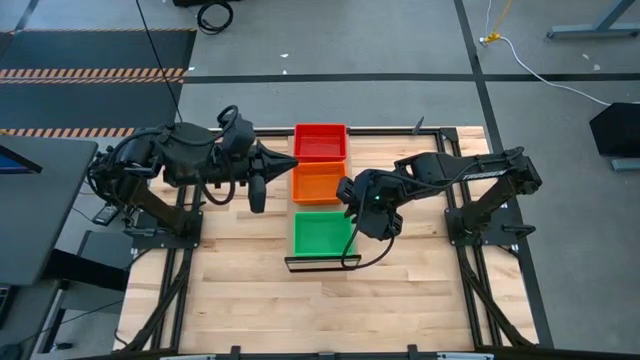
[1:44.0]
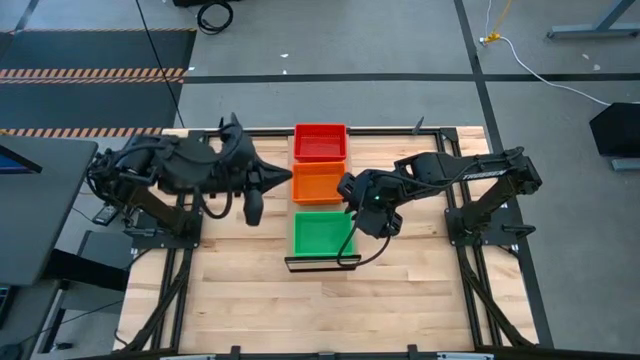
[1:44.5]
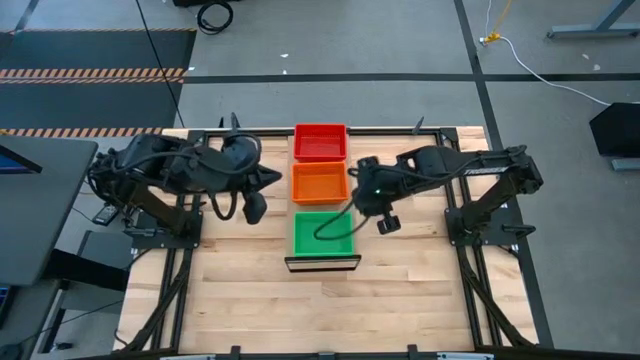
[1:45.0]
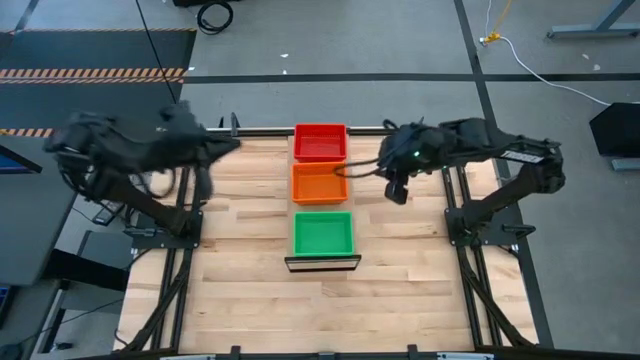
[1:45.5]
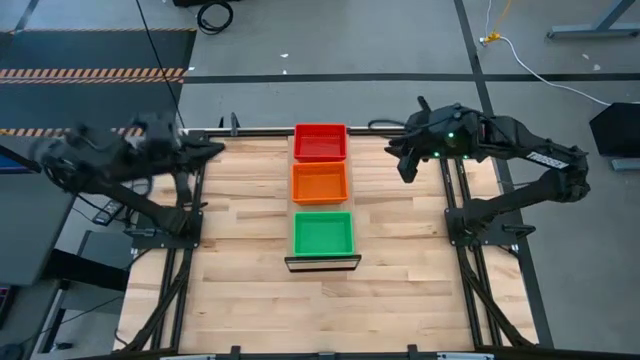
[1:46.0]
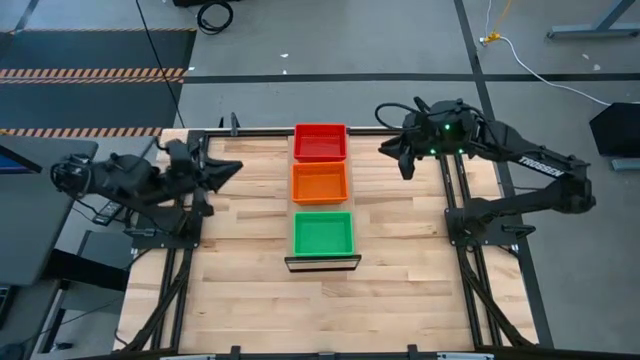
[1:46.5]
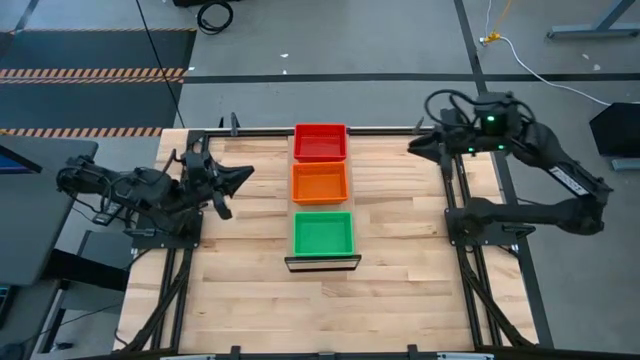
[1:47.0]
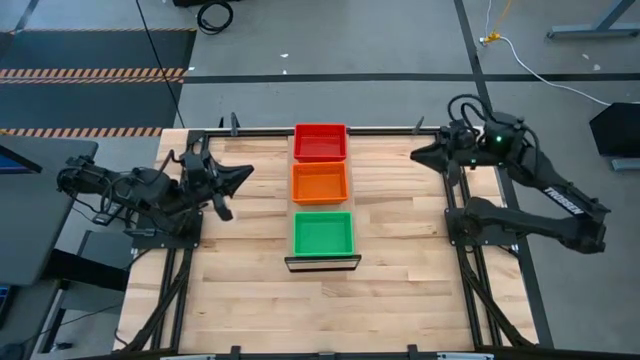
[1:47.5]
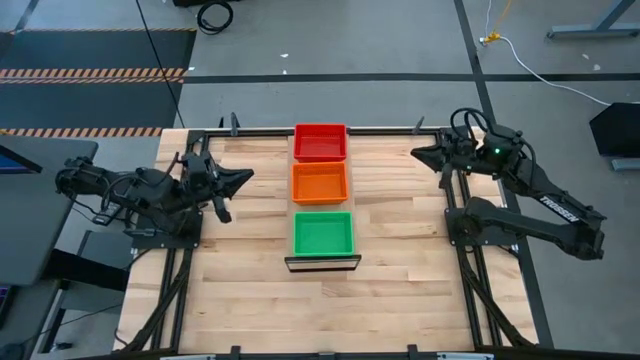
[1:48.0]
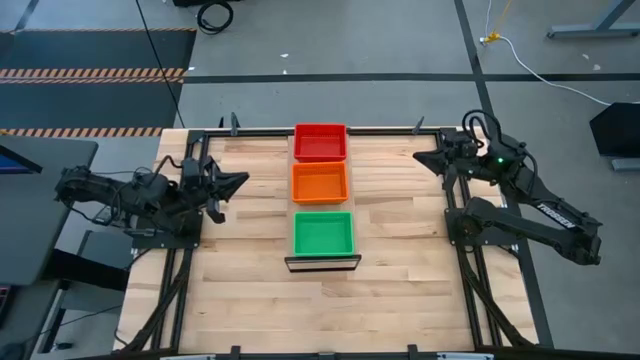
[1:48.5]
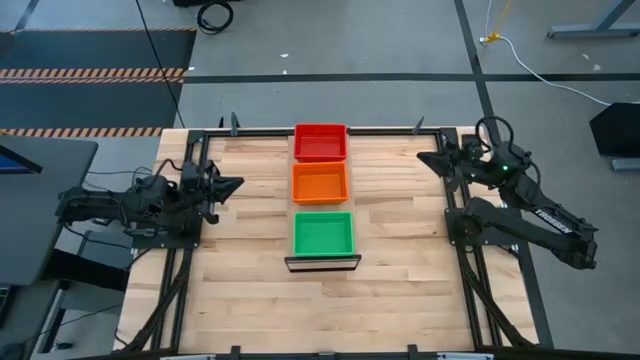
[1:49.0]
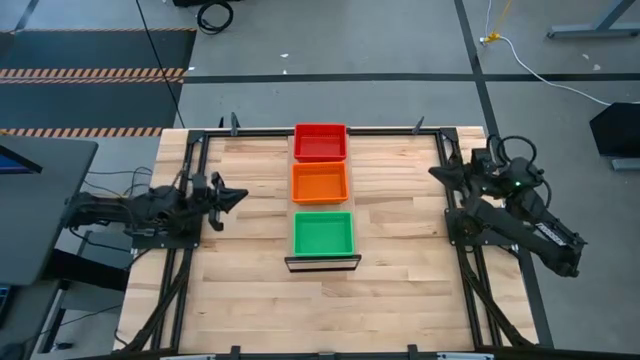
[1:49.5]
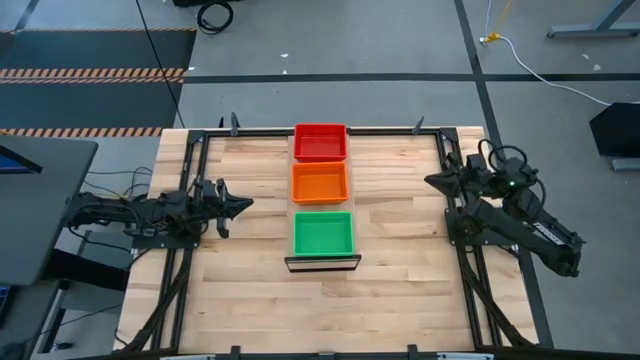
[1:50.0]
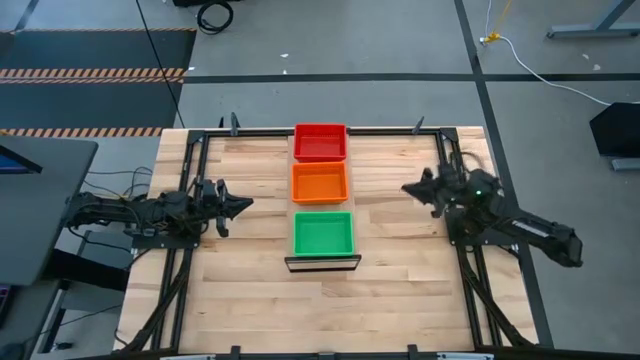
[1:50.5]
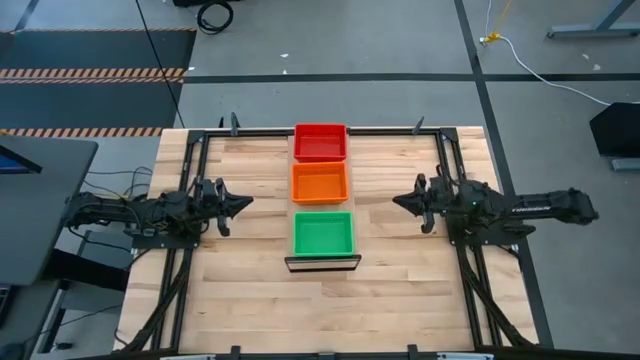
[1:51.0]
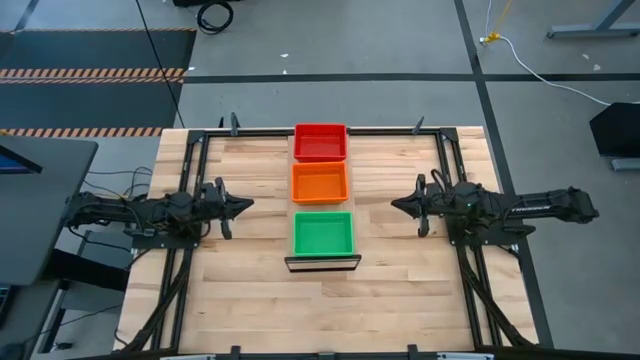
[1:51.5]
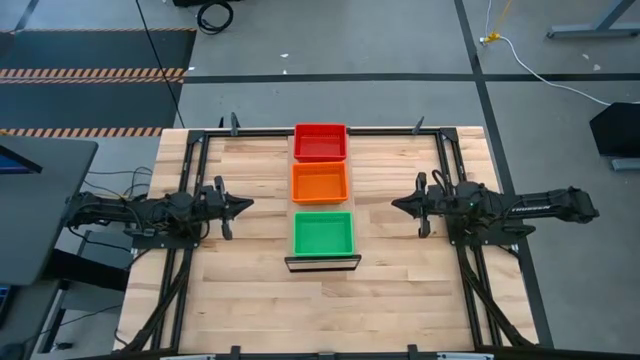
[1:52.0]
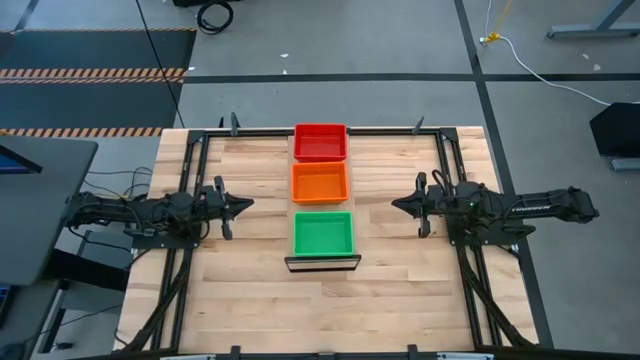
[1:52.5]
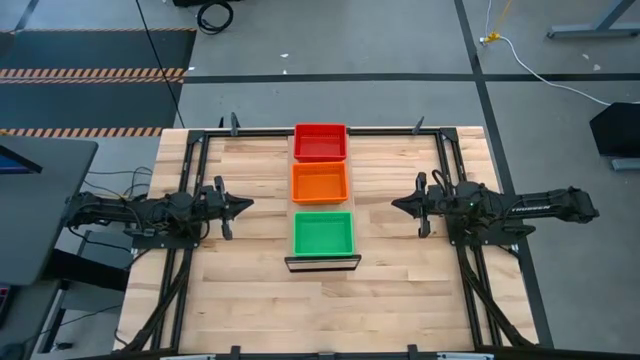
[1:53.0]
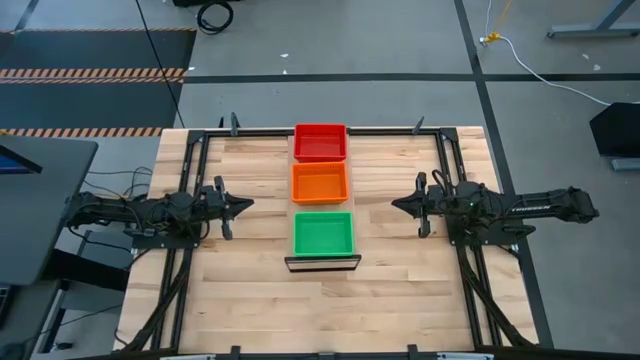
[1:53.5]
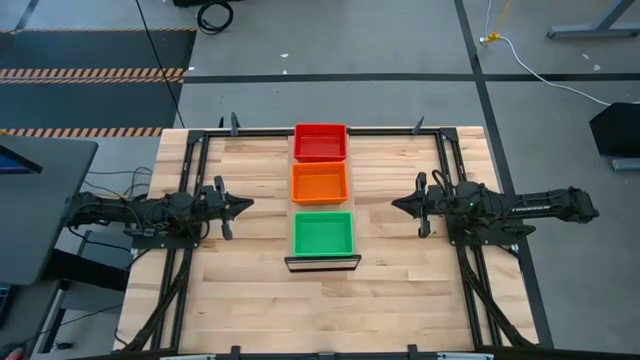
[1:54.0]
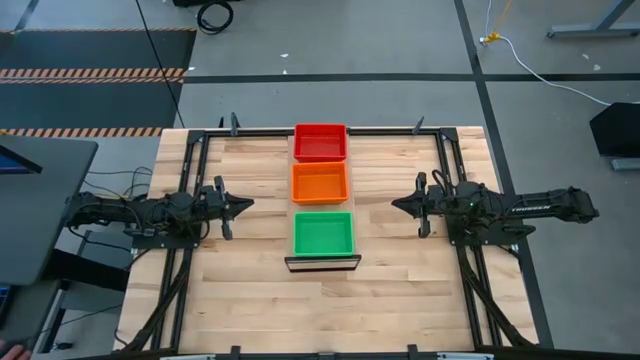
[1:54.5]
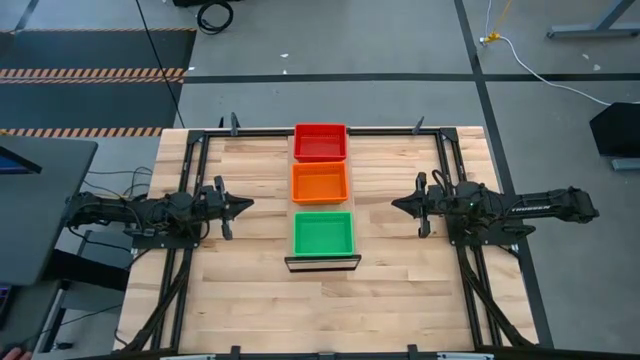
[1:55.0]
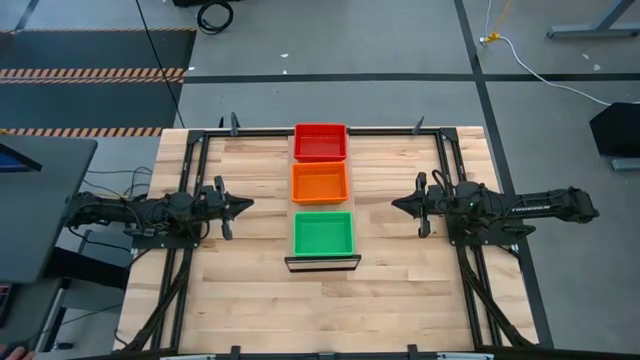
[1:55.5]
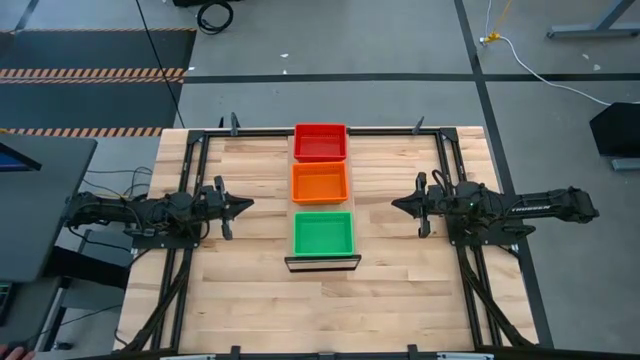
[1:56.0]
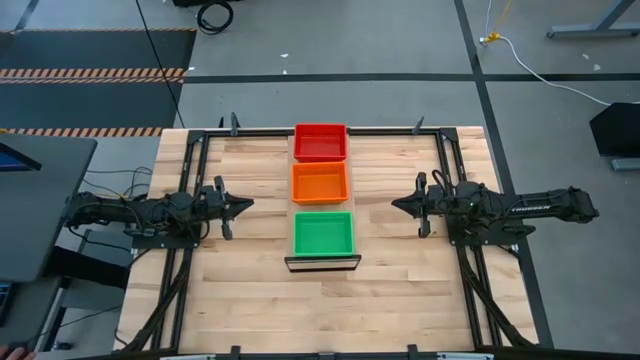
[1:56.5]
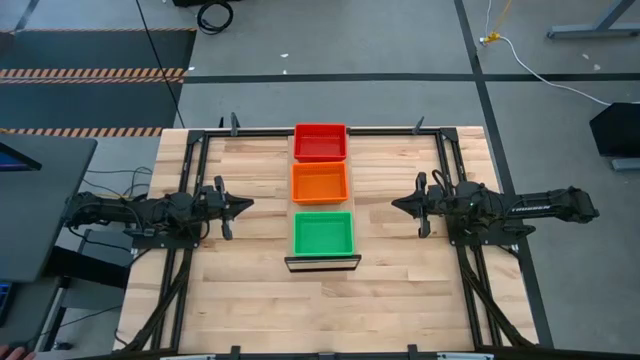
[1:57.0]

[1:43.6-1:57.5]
Task: Stack baskets on shelf by color
Return to Home Position

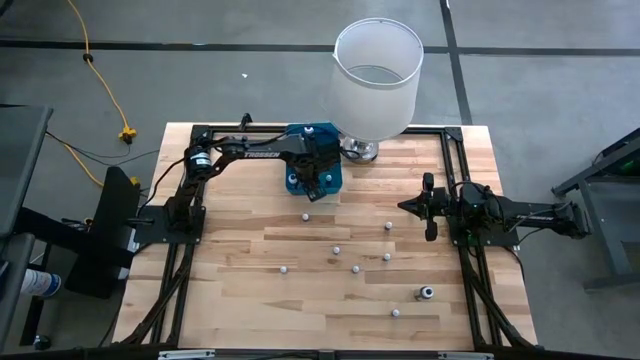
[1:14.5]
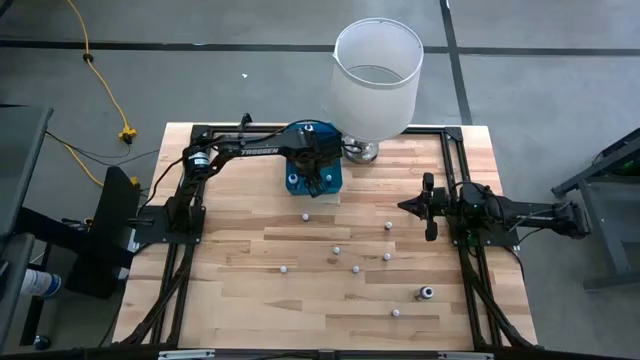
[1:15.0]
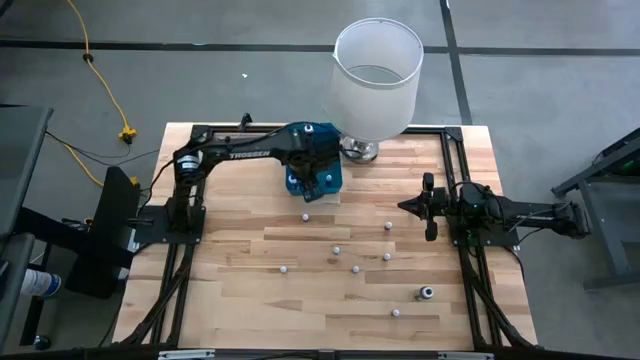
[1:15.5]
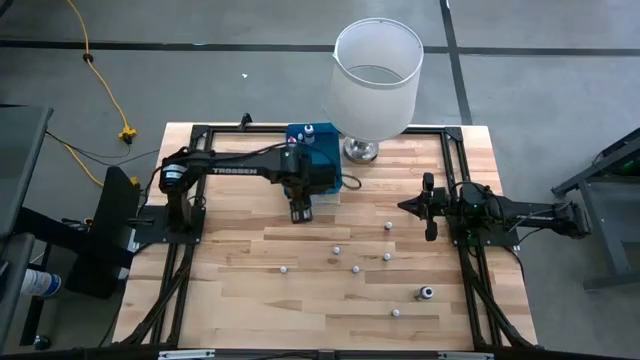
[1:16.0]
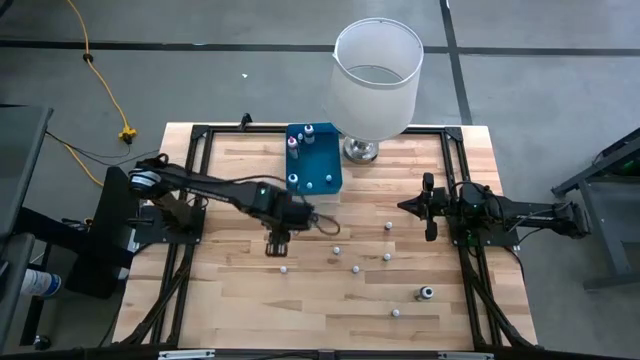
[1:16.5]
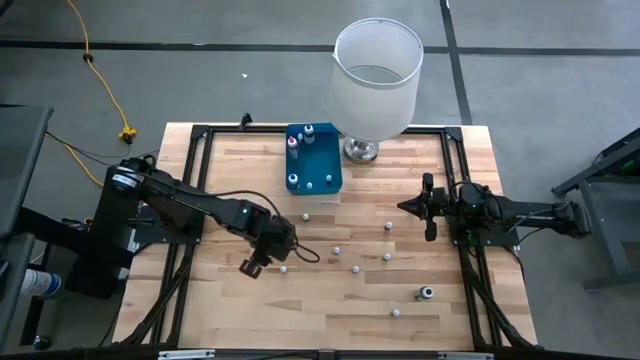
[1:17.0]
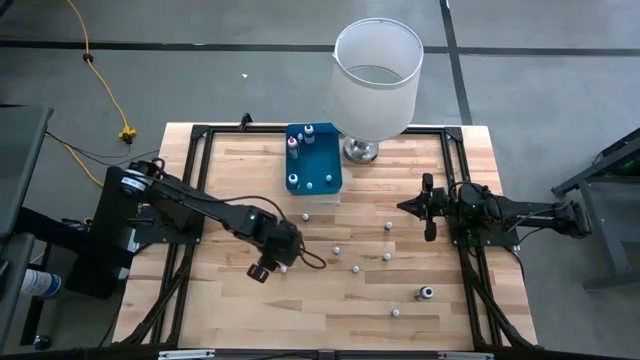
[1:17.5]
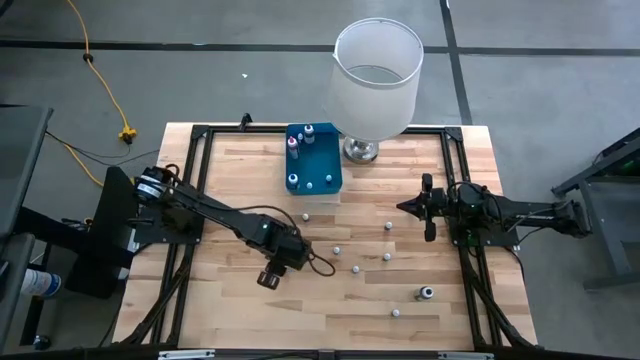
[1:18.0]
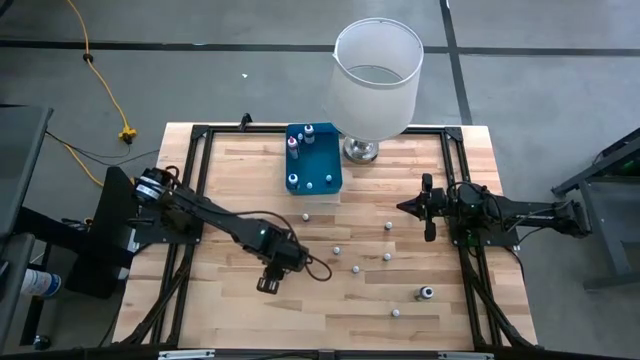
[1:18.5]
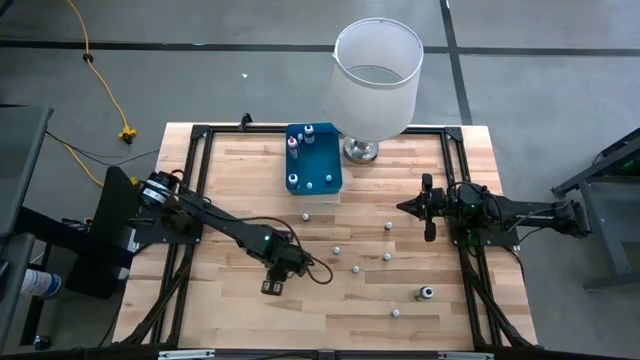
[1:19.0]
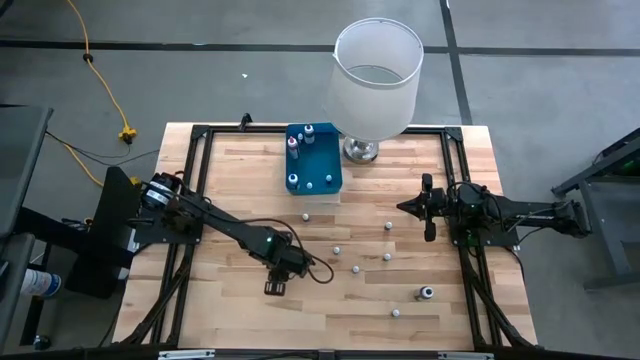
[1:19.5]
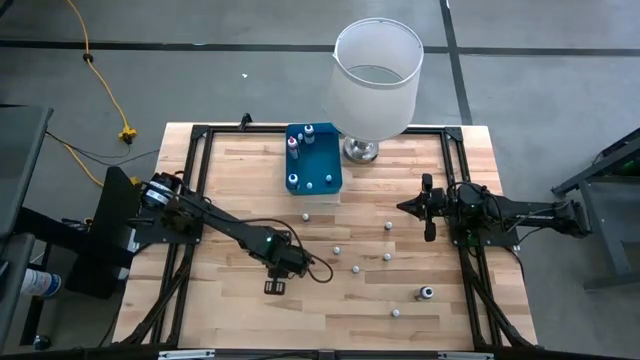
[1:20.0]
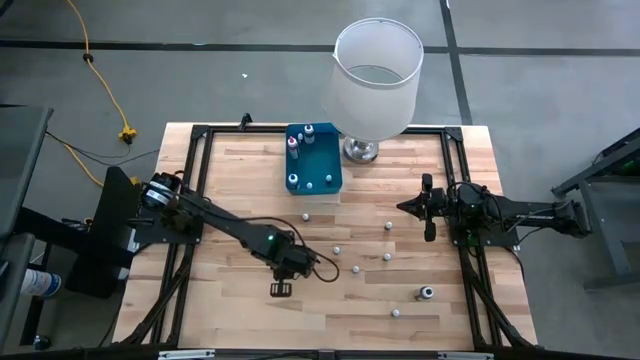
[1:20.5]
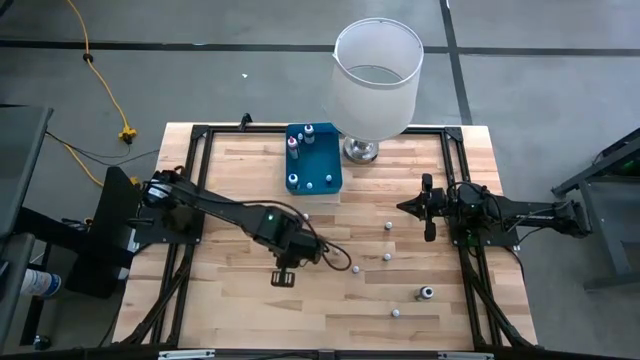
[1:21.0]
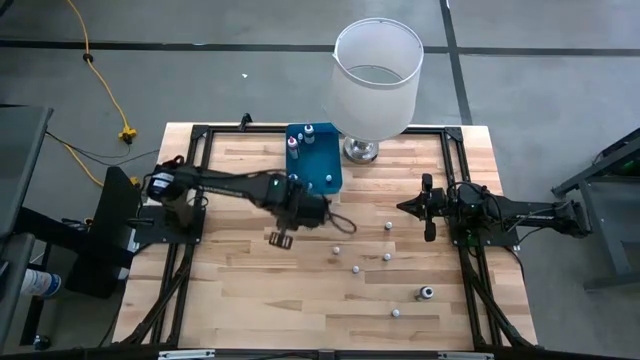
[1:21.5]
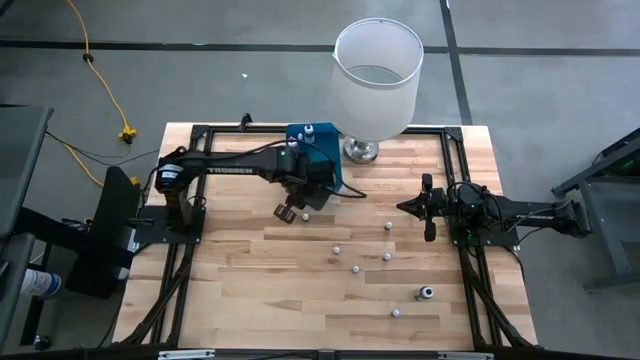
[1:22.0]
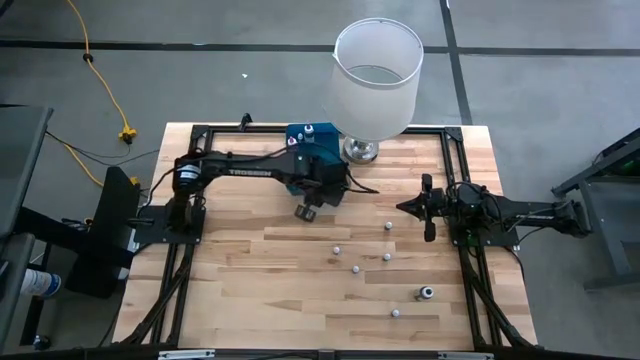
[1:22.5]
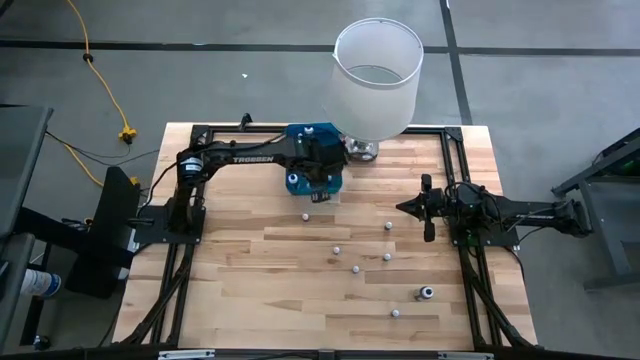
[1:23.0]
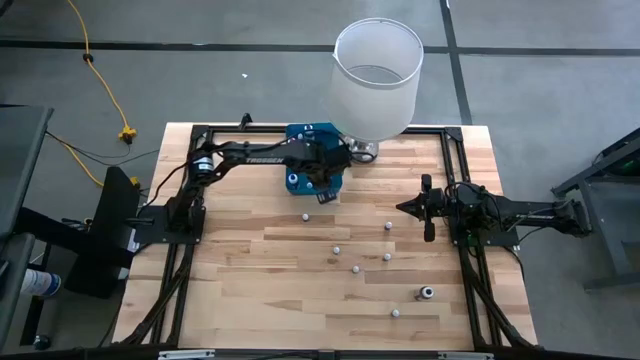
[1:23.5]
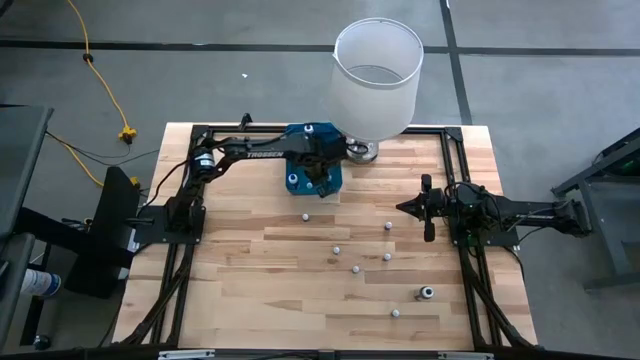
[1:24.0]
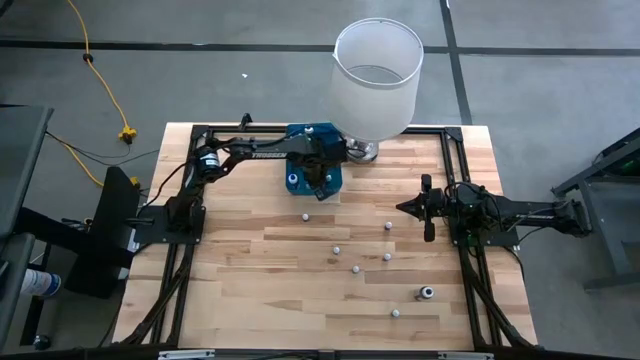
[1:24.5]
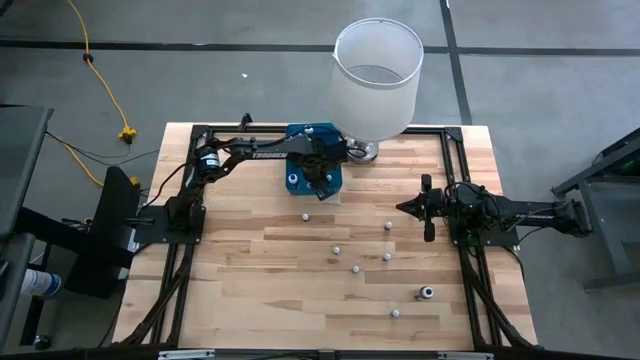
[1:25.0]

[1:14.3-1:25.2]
Task: Pick & Place food coloring
Put the small black food coloring bottle into the blue bin
